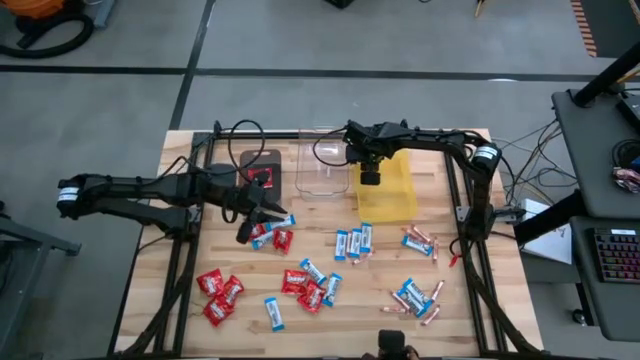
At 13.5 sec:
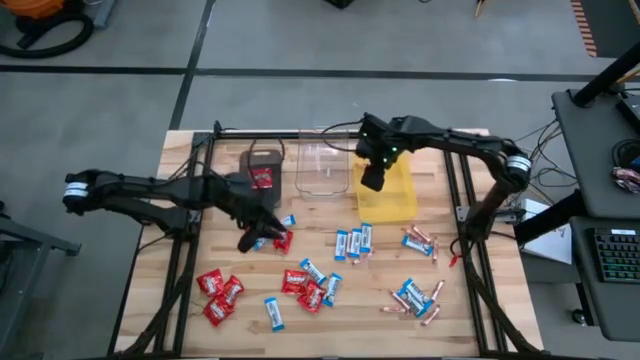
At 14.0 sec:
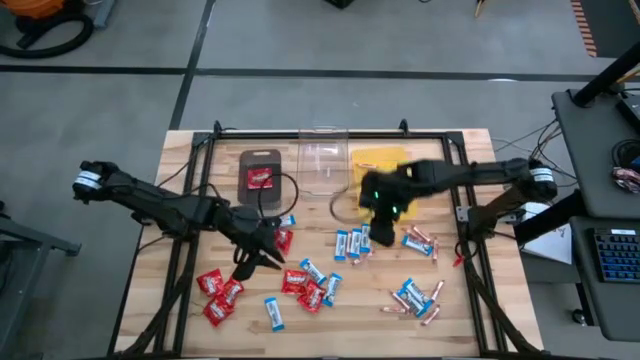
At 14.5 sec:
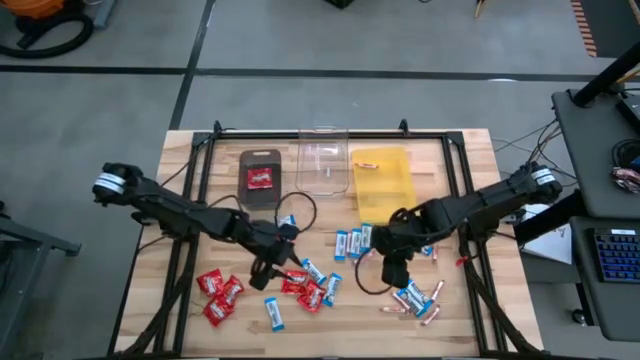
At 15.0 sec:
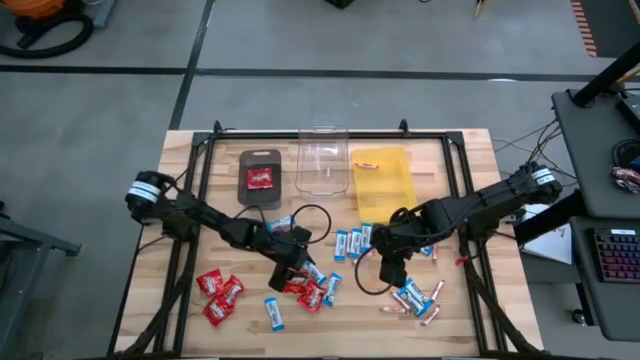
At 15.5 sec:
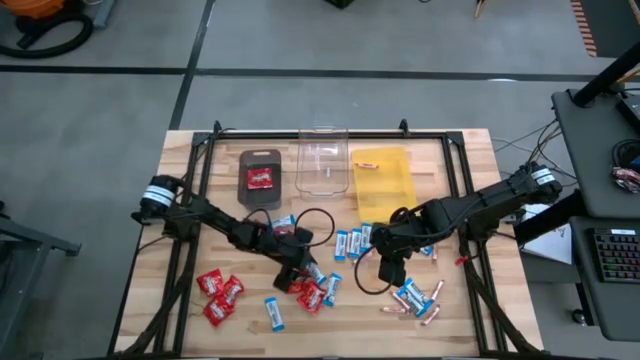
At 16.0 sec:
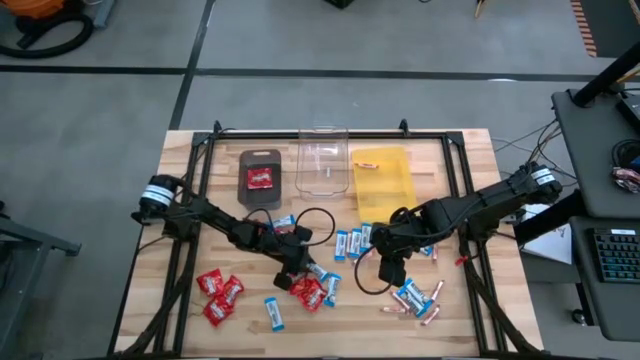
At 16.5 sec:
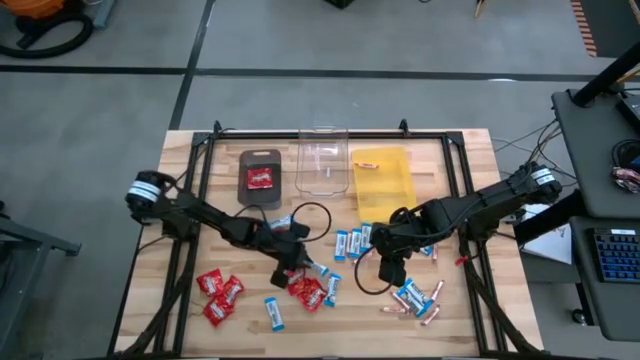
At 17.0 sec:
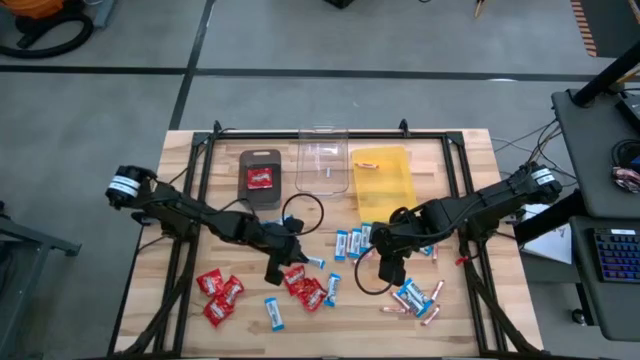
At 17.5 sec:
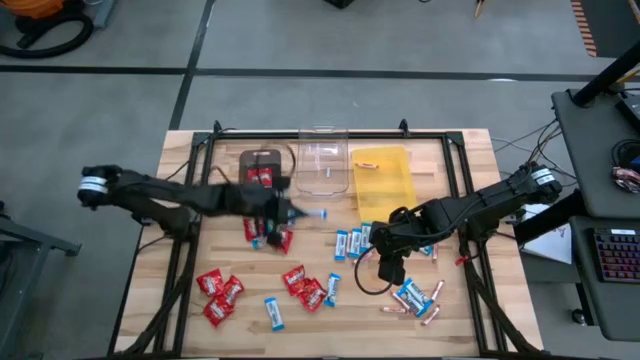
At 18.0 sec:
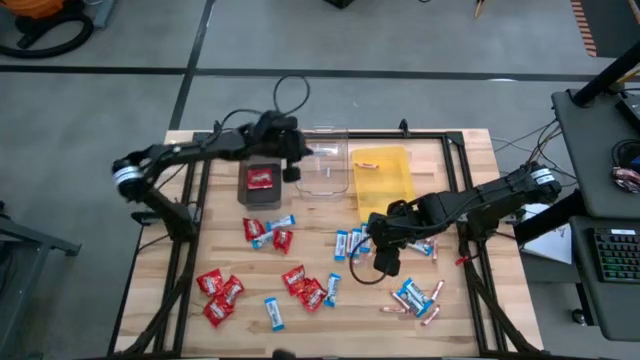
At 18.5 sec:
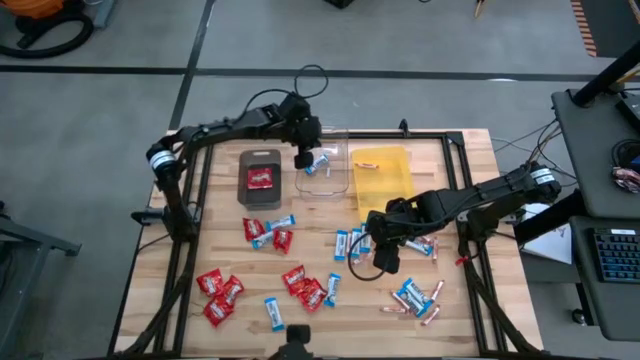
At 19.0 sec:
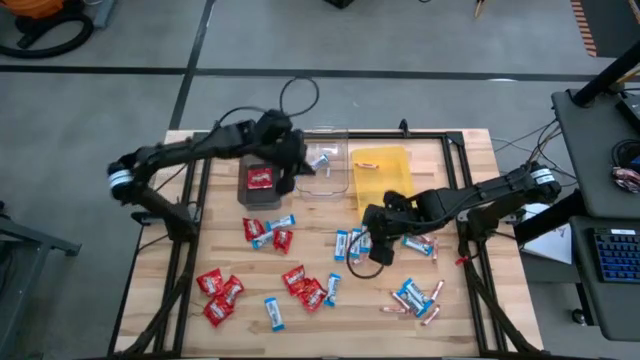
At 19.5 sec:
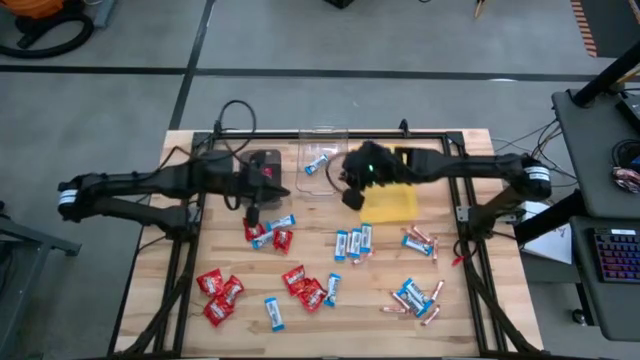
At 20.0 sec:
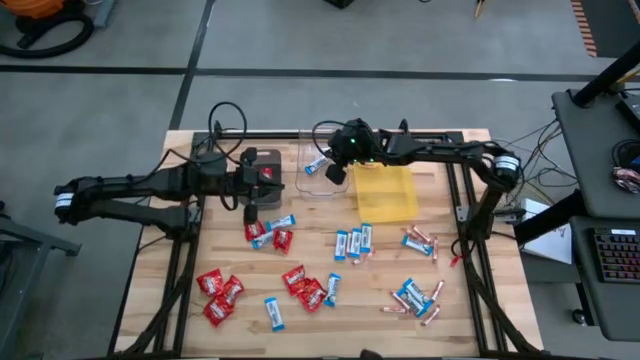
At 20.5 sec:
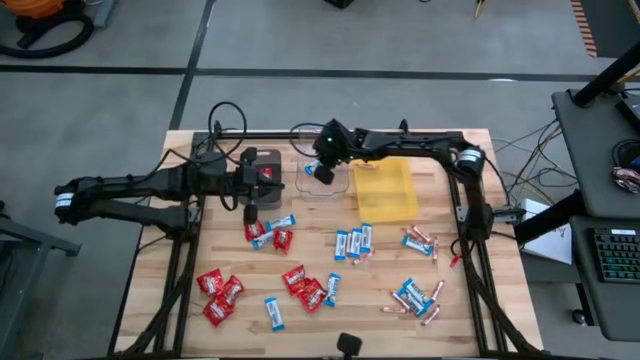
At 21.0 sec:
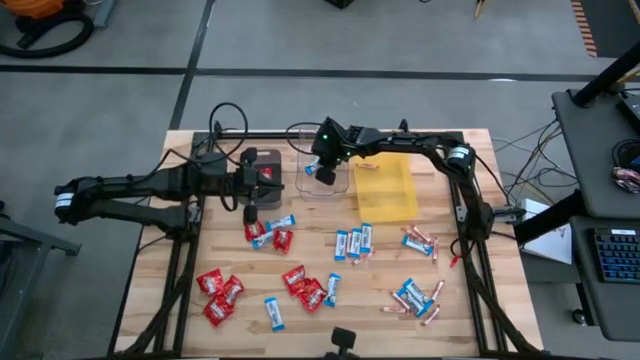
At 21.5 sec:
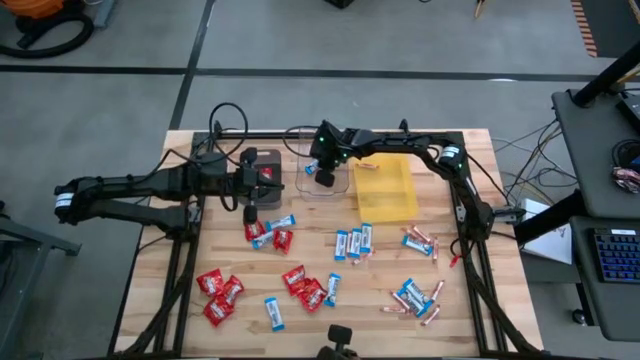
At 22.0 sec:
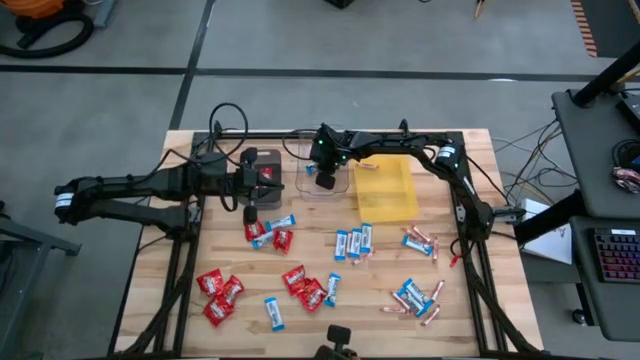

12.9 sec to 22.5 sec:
Task: Sort candy
Put the white chocolate into the transparent bin

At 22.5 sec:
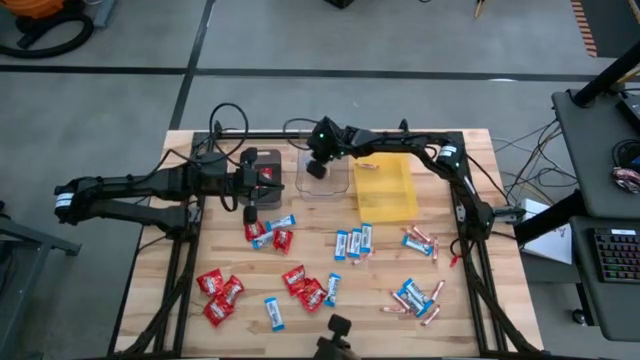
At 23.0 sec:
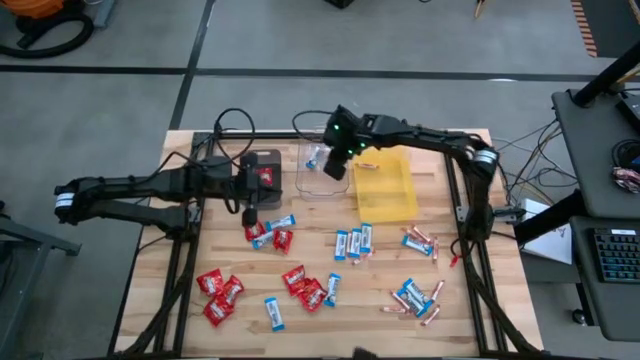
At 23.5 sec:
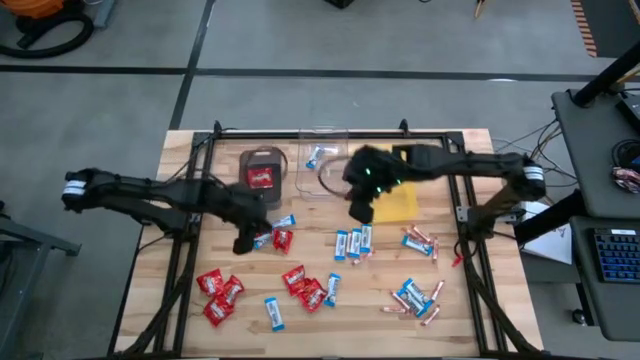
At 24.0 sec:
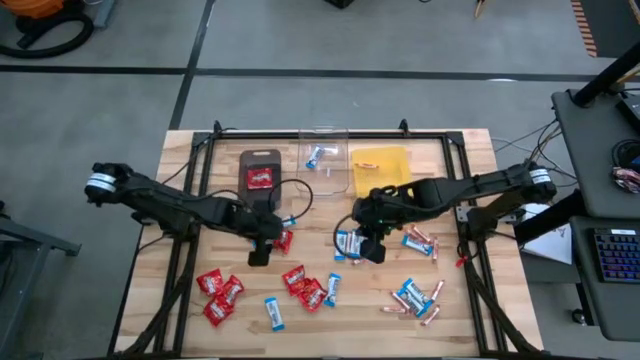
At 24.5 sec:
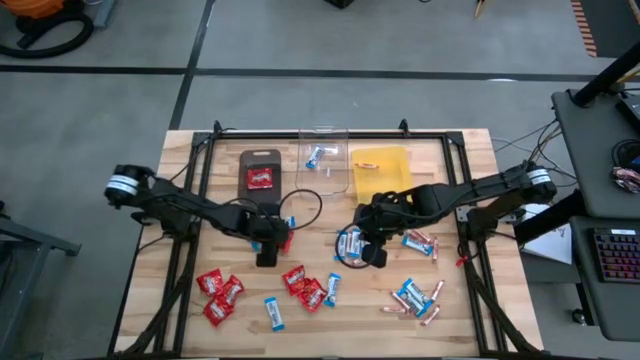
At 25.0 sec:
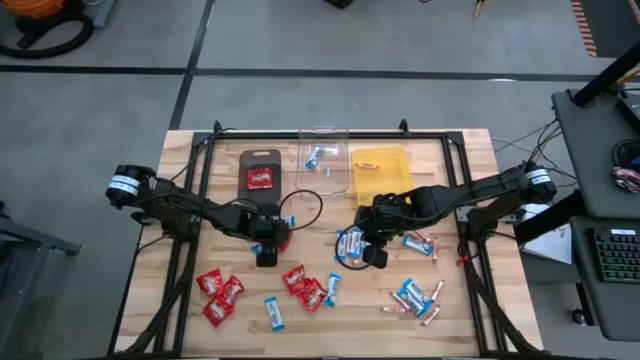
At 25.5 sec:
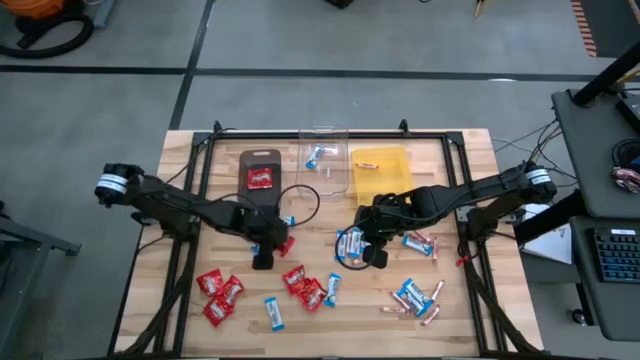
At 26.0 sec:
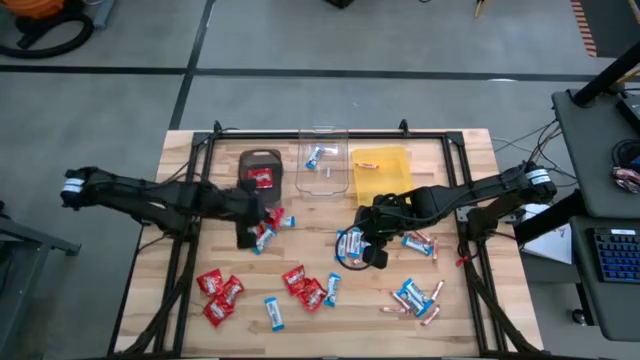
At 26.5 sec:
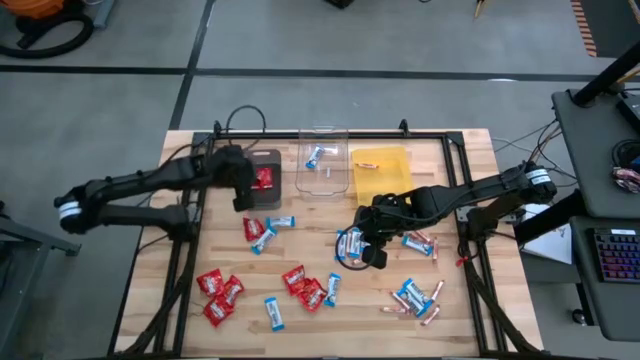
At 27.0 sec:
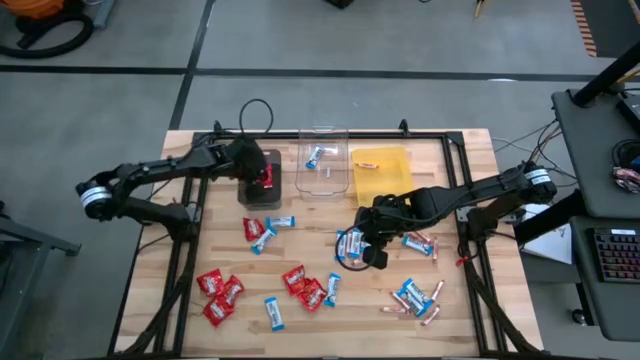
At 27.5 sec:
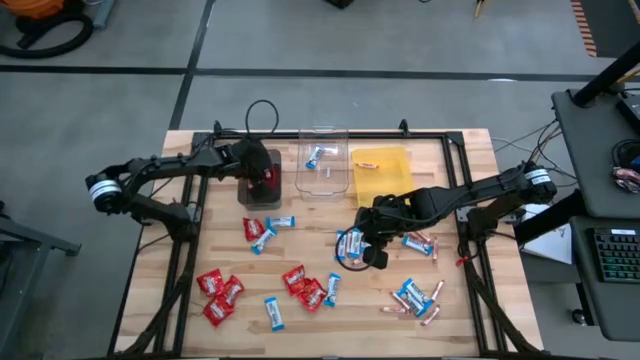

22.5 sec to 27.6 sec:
Put the red candy into the black bin

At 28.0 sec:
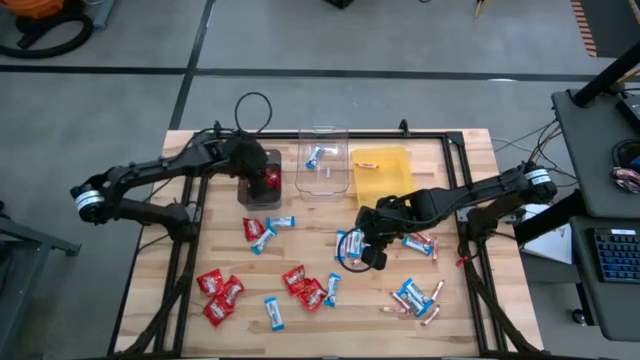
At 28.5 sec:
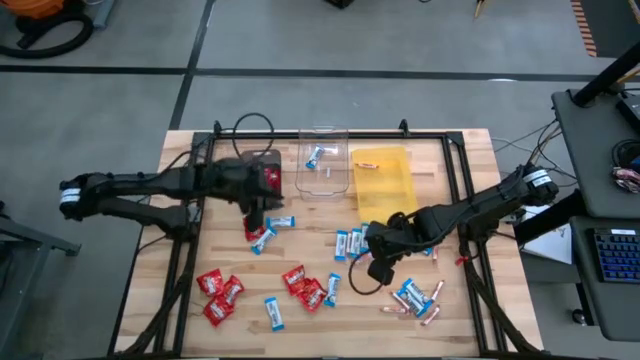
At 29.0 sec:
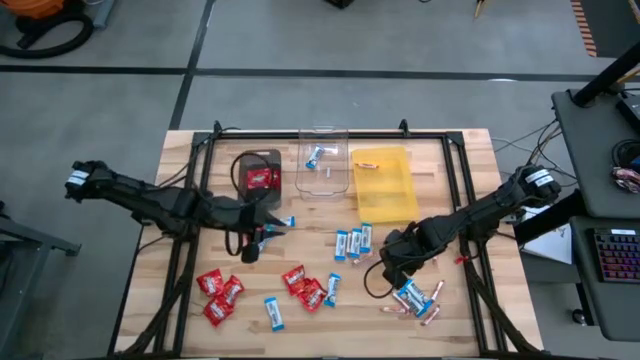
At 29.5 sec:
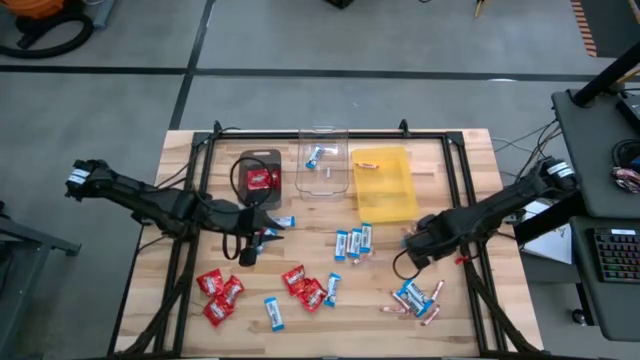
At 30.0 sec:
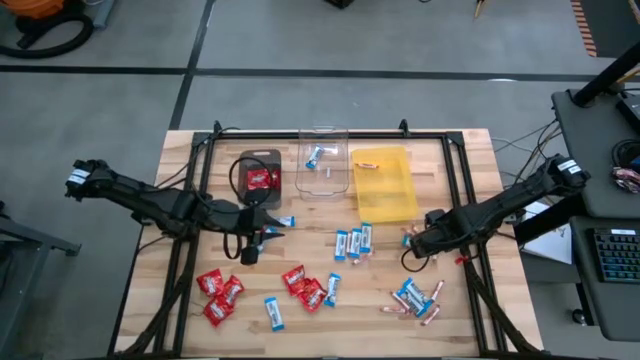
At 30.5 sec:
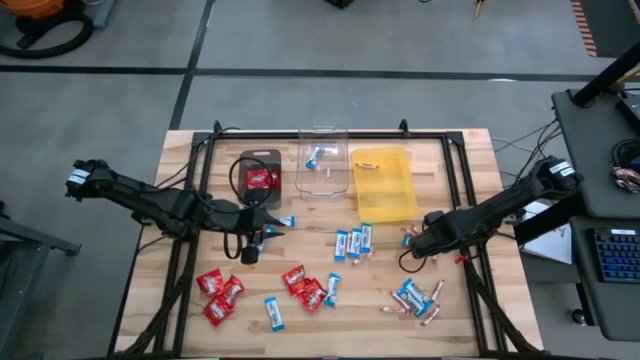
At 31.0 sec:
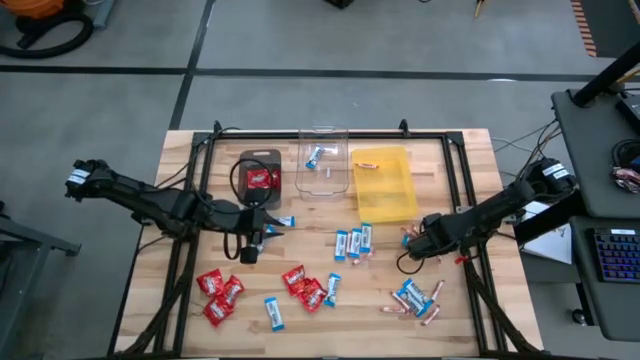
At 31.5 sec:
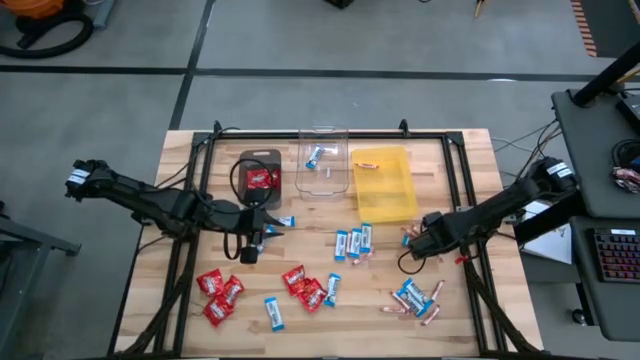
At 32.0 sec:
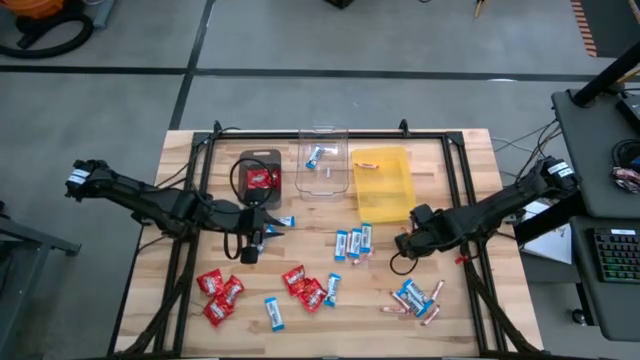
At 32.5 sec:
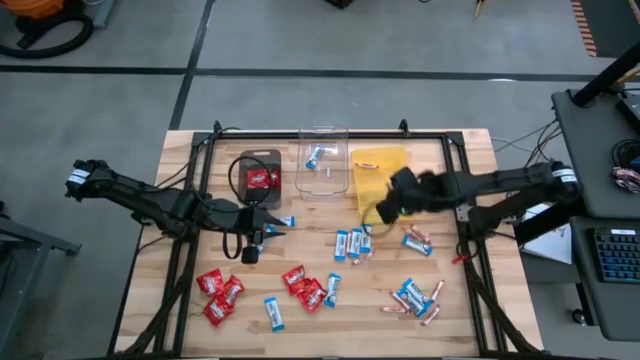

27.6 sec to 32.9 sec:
Put the white-red candy into the yellow bin
